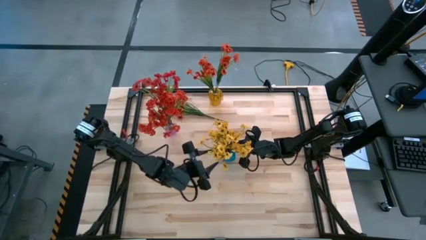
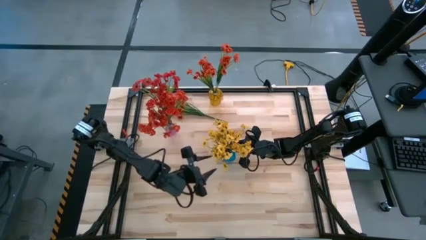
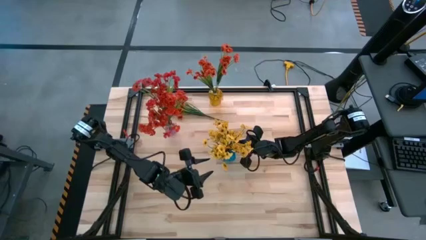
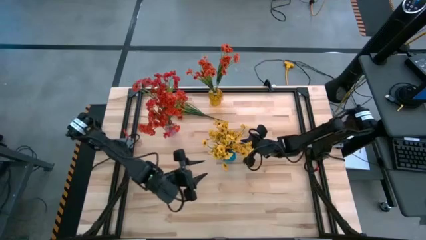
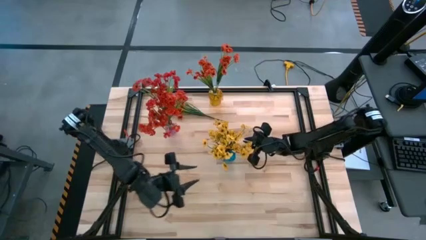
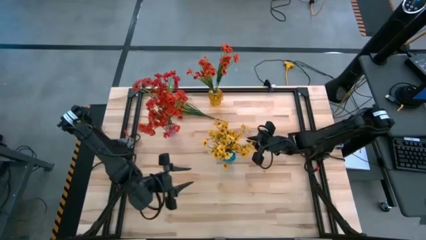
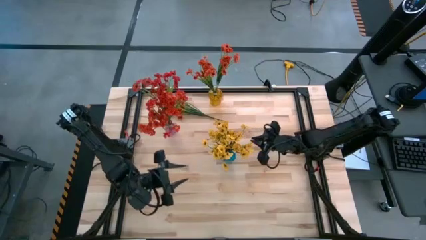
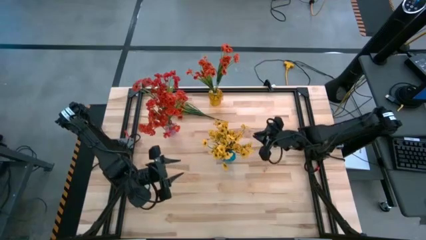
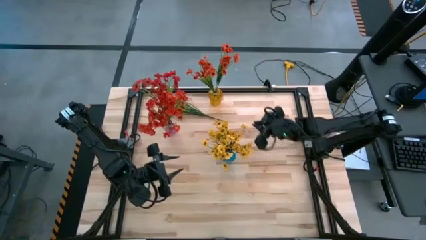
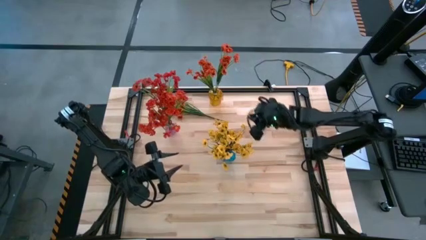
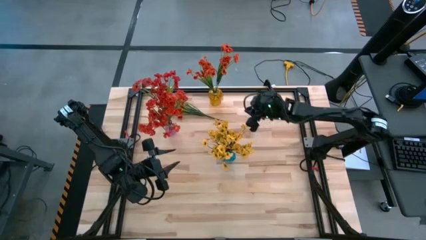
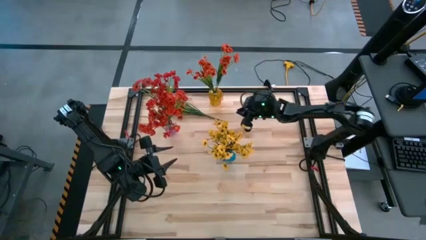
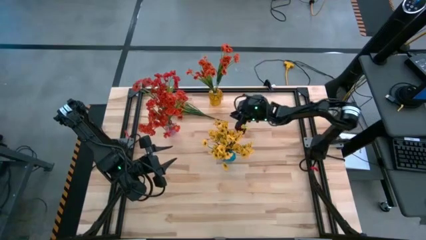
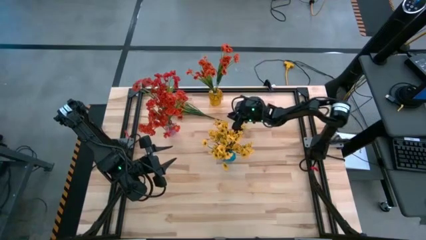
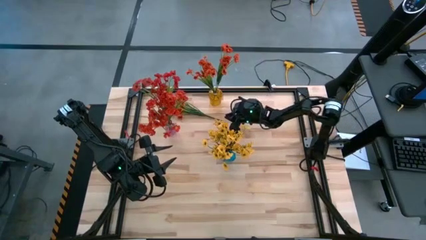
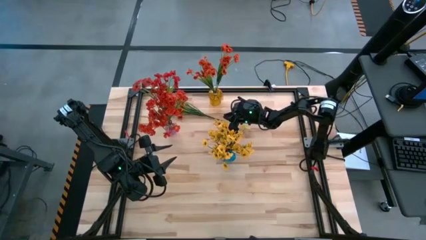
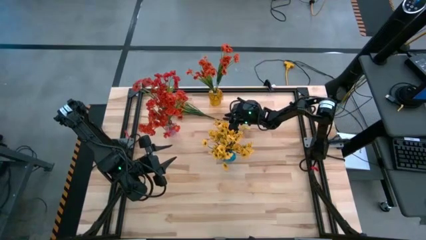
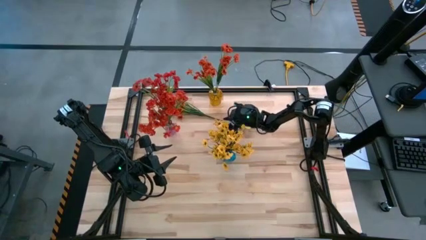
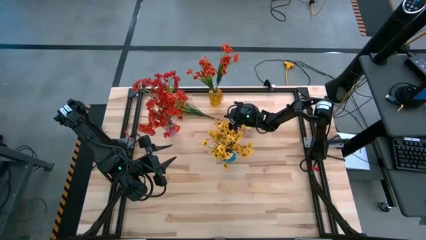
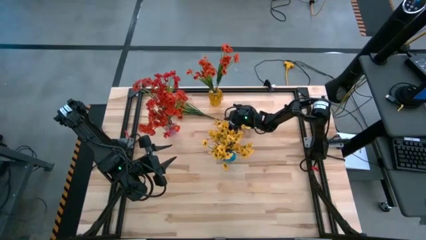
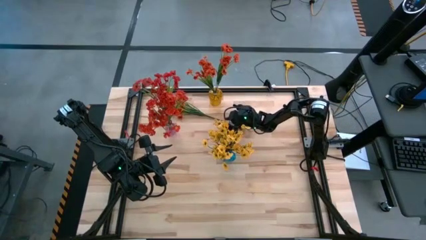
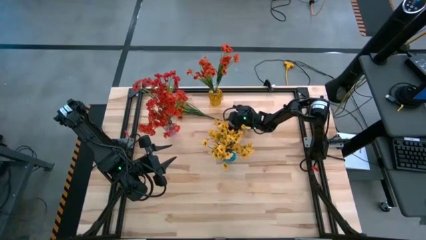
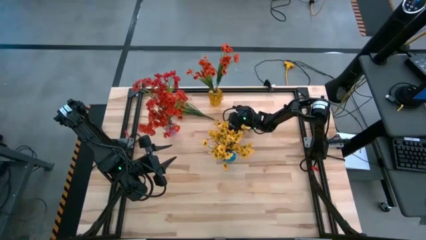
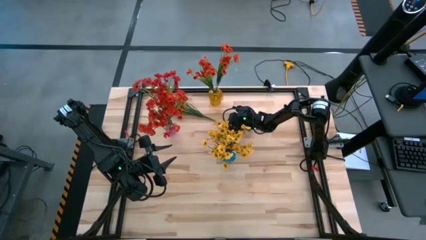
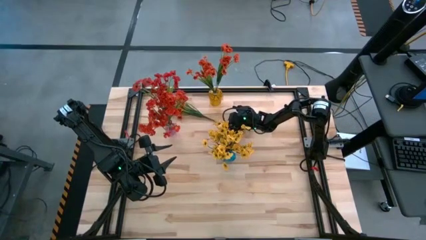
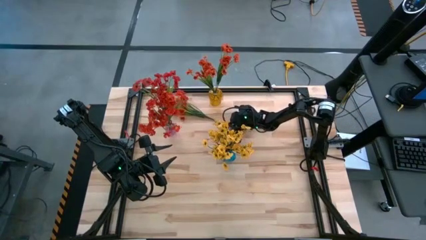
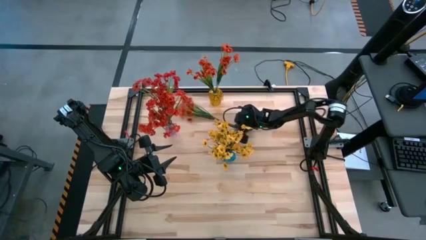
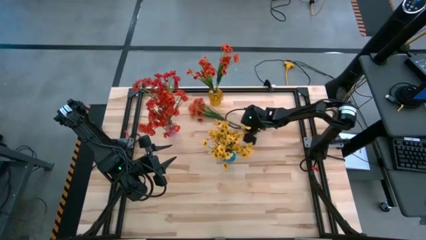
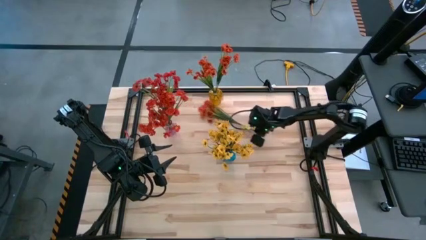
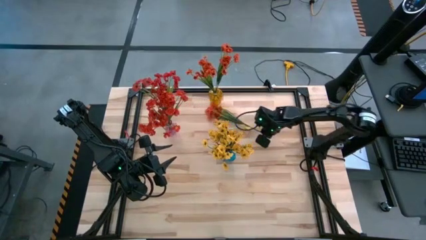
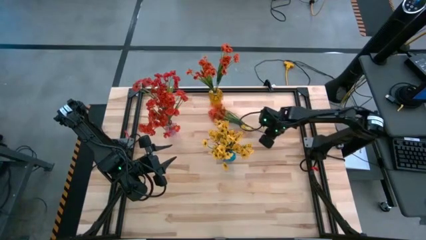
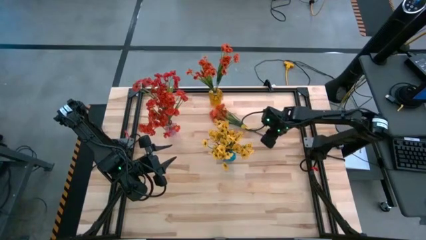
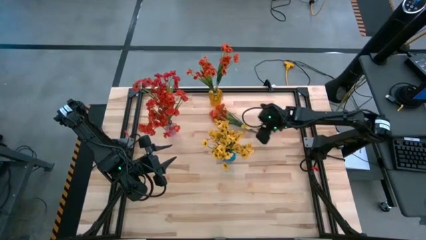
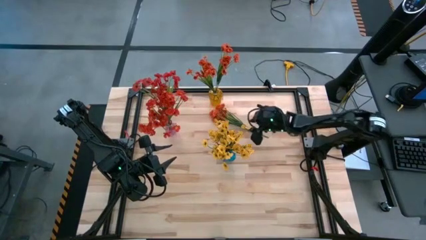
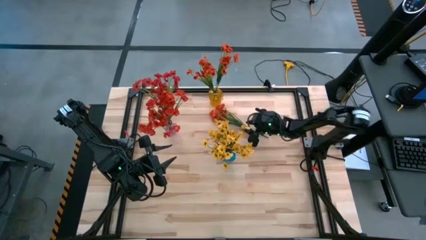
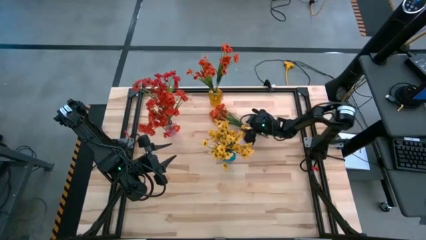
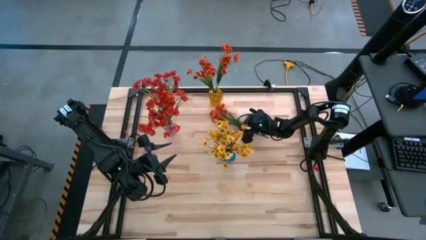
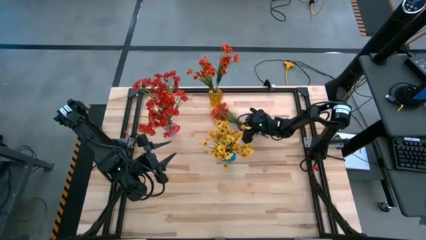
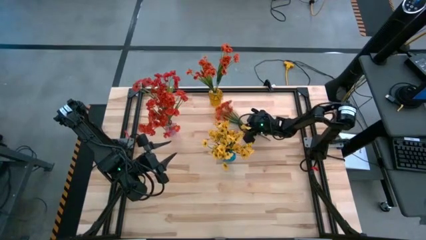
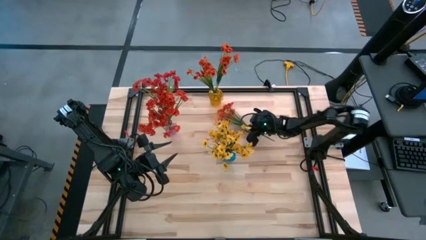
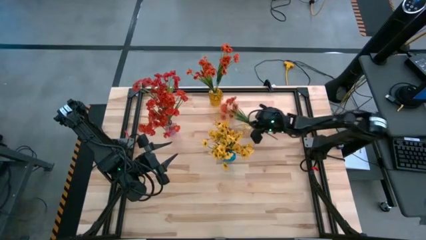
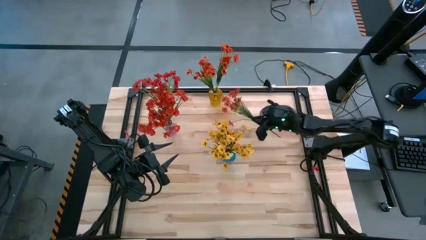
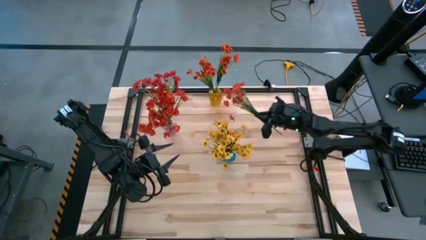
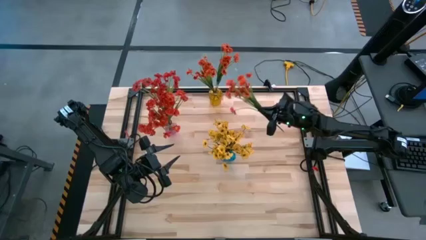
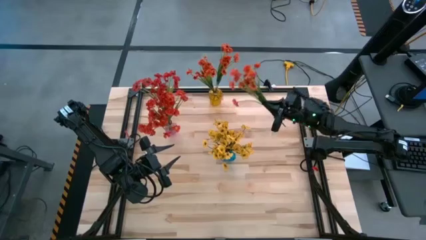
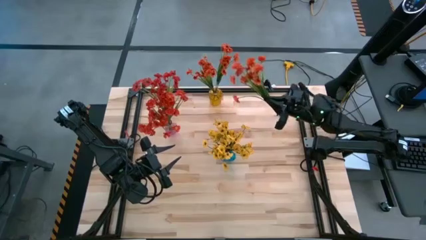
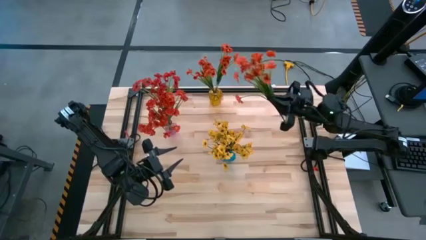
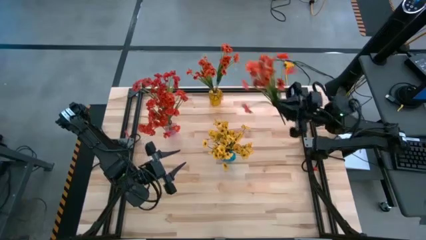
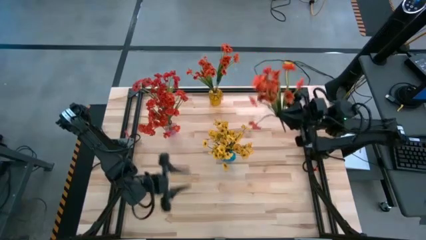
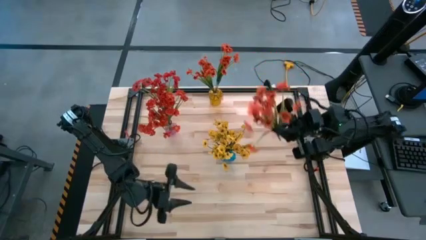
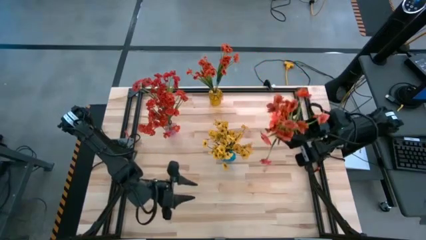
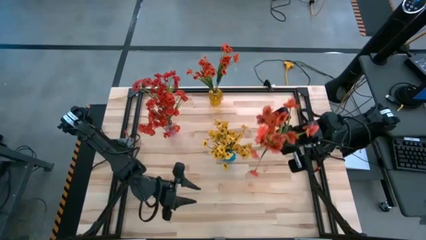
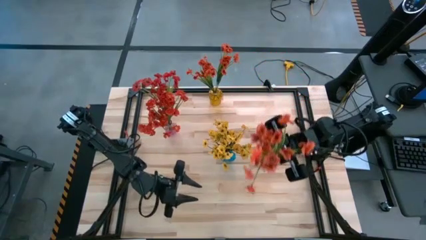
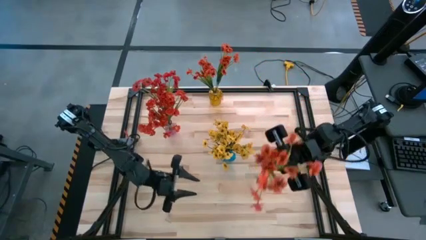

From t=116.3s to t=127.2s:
Task: Sort flowers into vase by color
Put the orange flowers into the yellow vase
